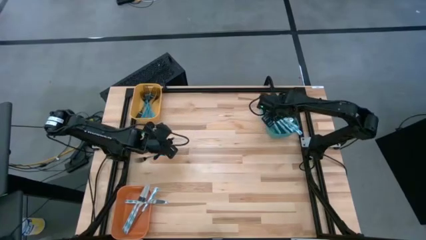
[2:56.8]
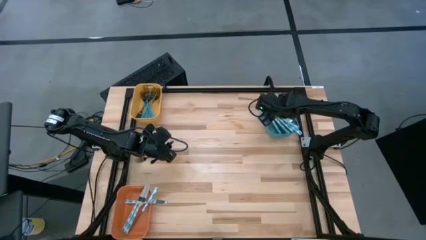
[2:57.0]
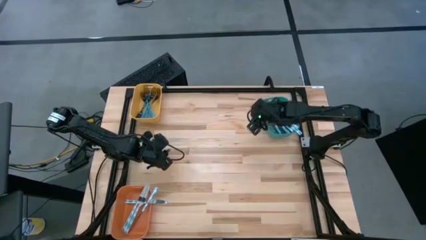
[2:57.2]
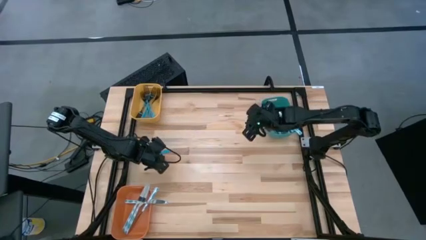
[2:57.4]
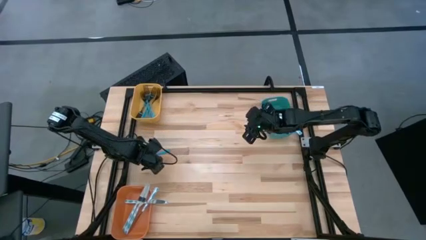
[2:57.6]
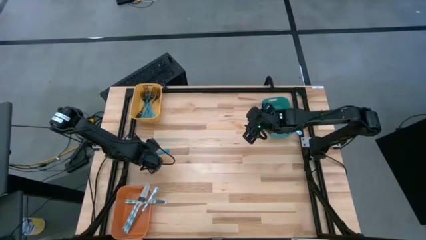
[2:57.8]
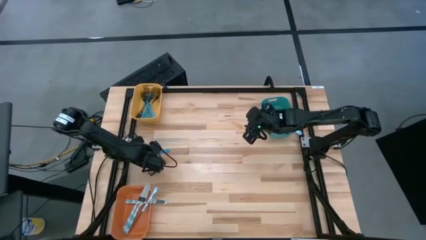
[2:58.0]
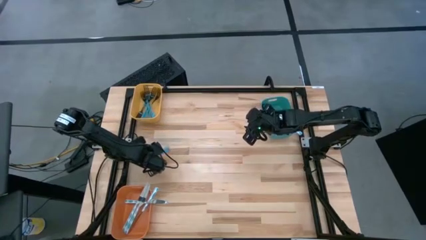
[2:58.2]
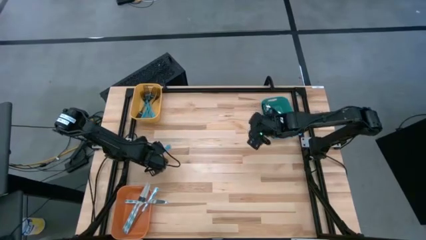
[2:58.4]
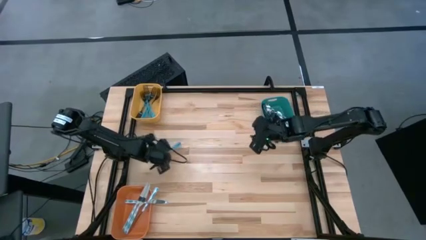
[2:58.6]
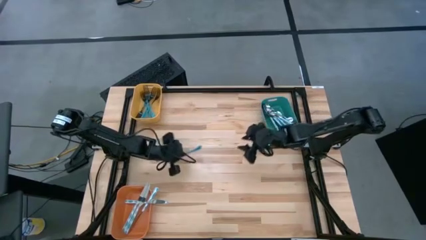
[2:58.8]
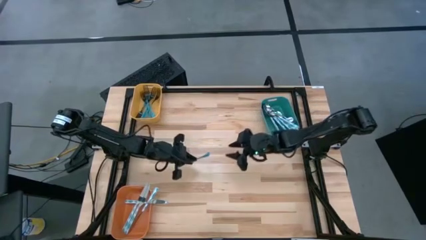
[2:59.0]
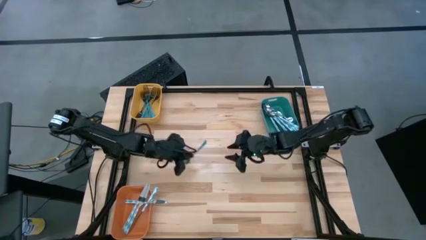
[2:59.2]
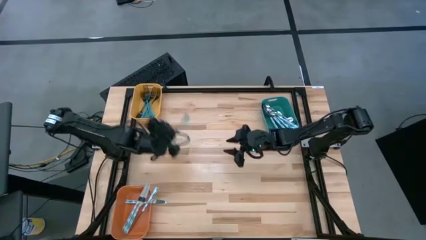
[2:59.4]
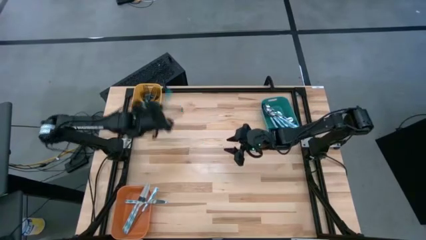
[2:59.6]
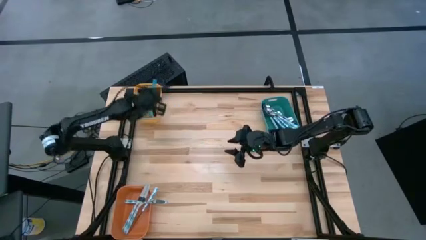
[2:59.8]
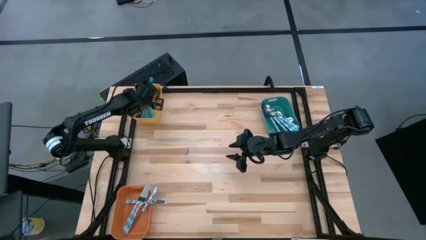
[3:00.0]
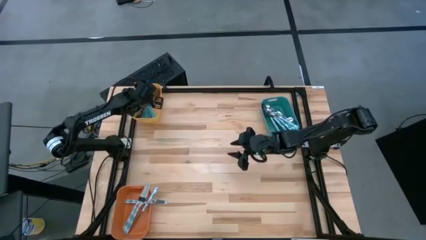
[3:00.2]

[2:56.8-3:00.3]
Task: Sort silverware by color (type)
Put the blue fork into the yellow bin

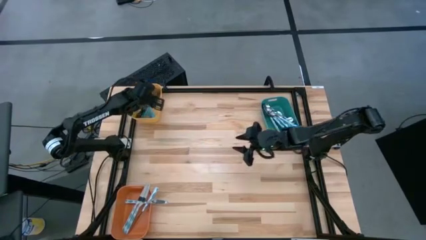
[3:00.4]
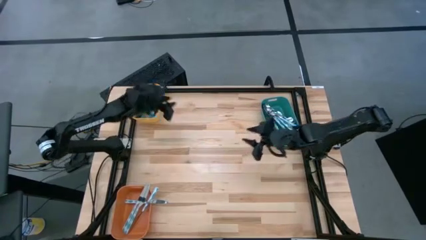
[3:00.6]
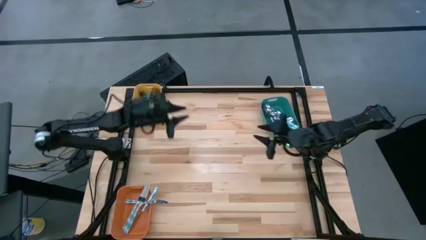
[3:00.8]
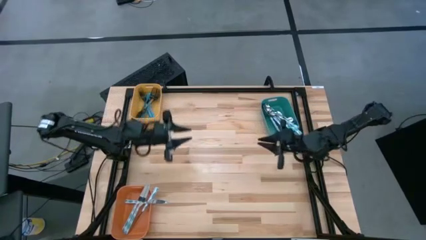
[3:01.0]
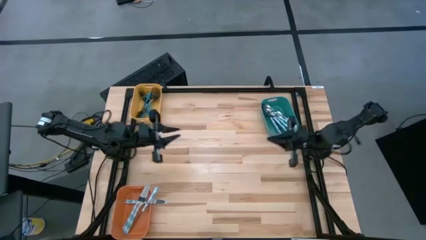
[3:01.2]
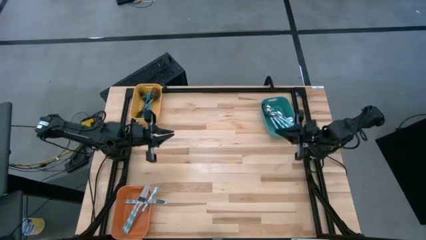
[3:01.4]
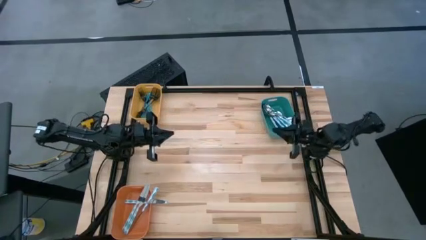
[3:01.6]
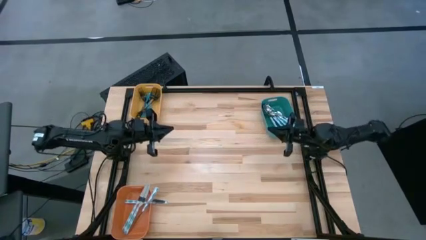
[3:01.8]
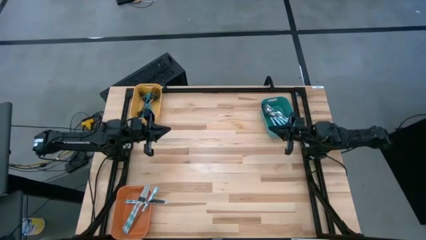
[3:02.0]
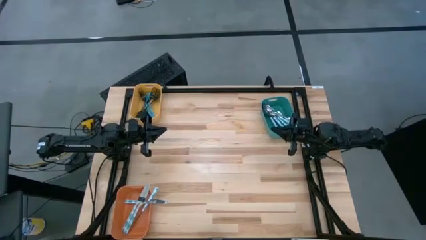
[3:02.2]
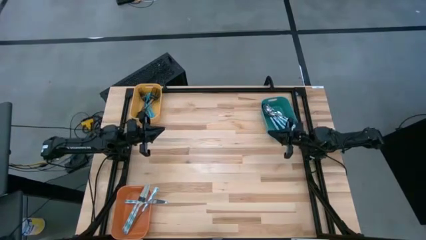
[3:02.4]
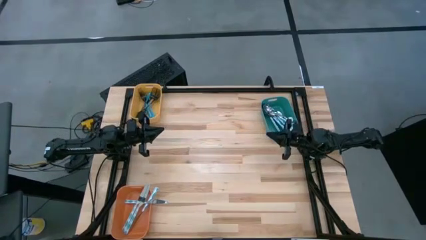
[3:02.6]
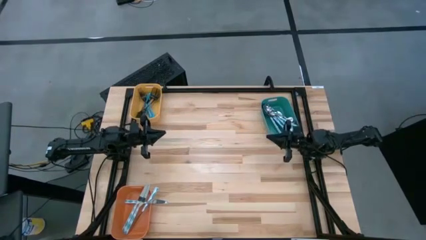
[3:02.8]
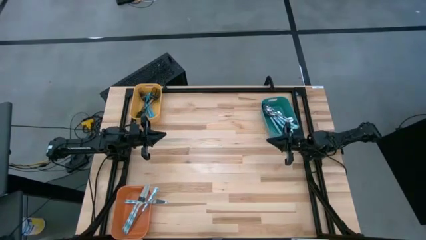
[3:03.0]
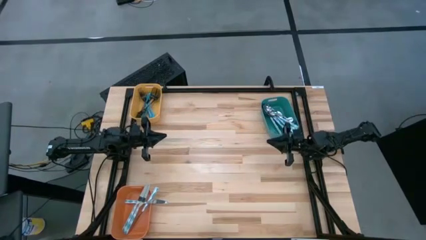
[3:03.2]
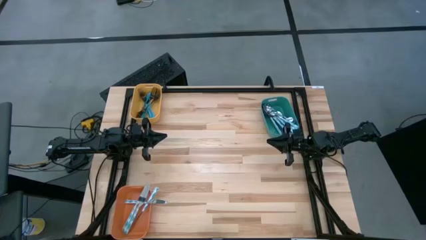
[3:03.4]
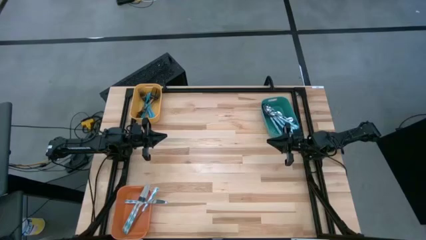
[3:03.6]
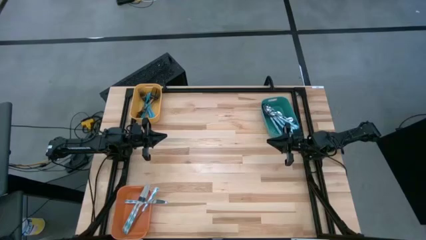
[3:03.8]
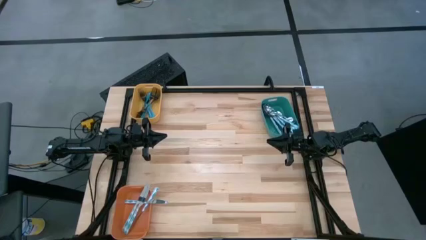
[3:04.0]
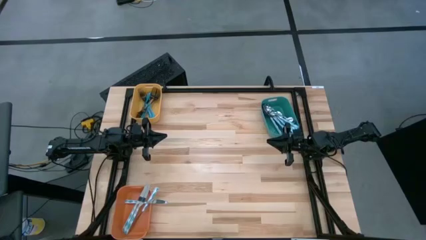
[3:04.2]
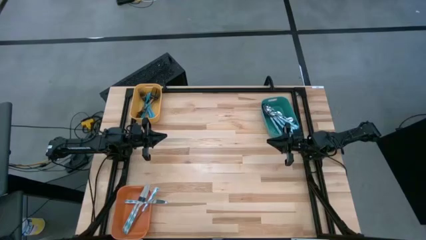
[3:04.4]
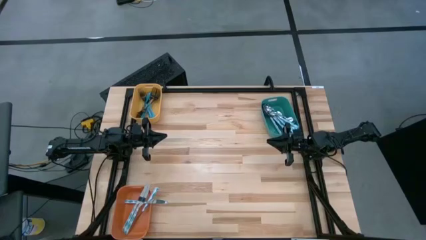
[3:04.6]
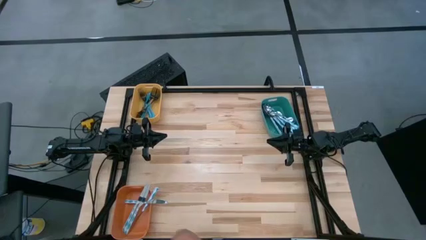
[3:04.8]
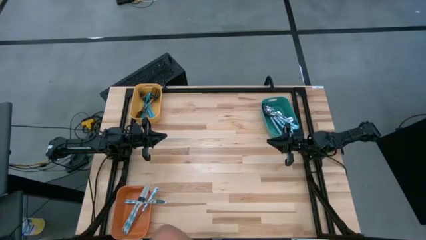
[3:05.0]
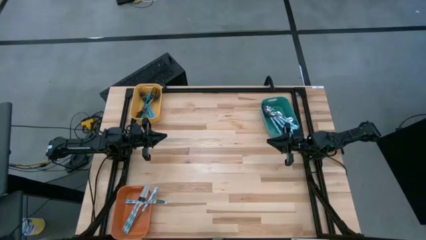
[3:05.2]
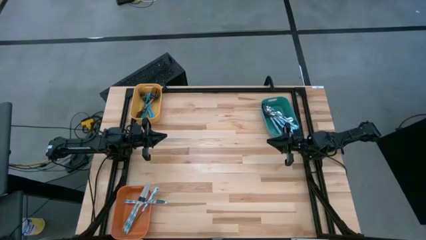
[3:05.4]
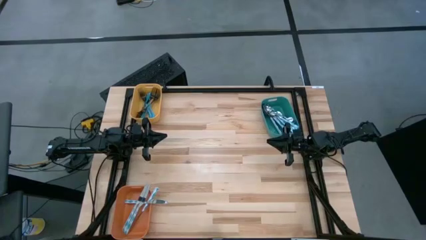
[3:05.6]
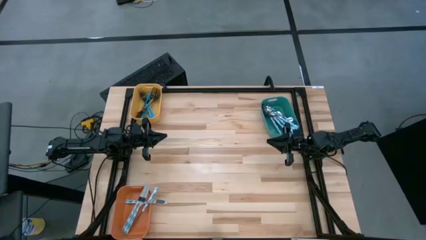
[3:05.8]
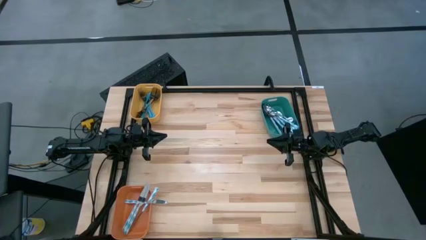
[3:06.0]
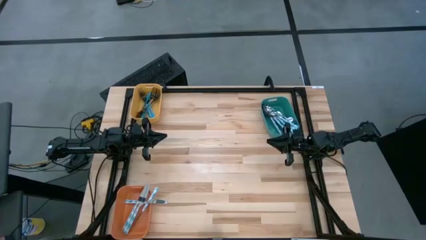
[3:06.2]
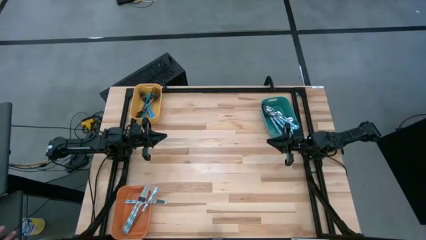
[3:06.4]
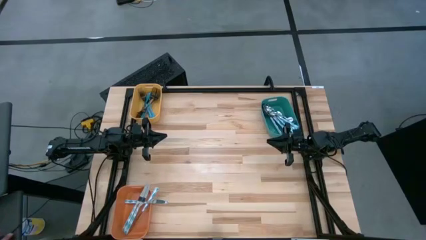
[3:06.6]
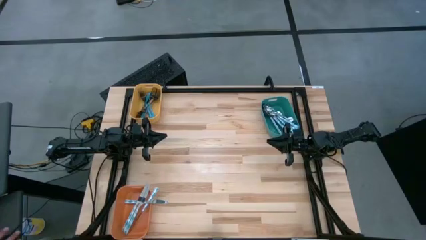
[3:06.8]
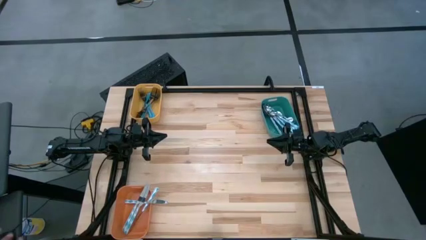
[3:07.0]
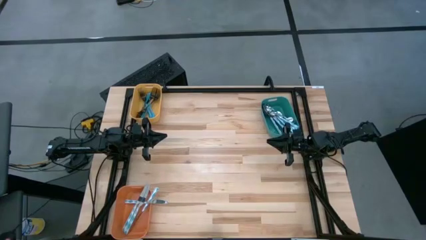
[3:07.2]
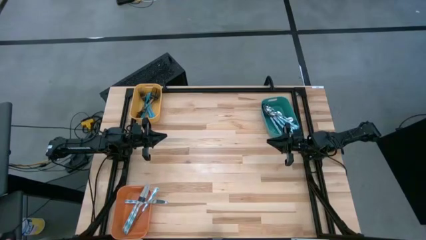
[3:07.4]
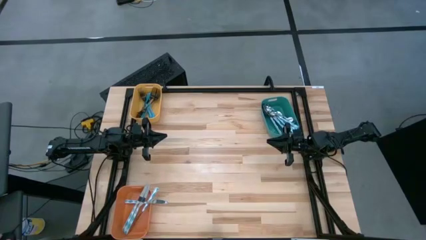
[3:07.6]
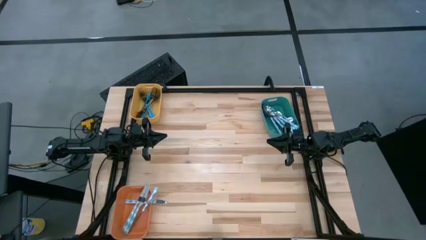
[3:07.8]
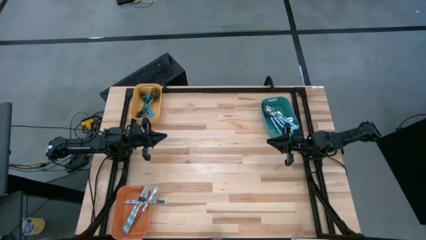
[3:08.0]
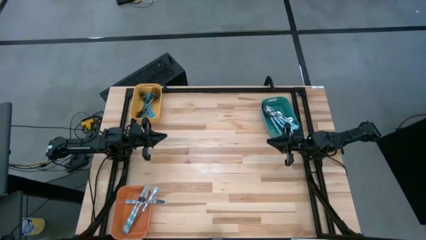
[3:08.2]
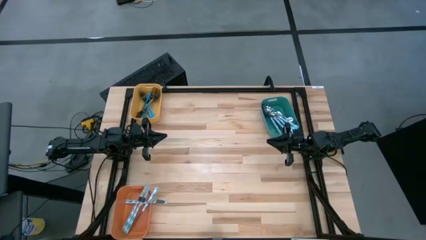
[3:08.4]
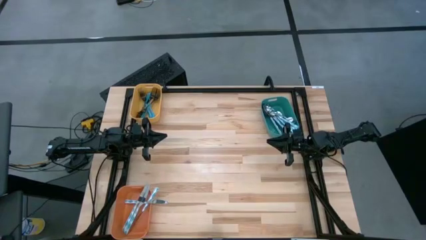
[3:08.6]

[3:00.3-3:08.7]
Return to Home Position
